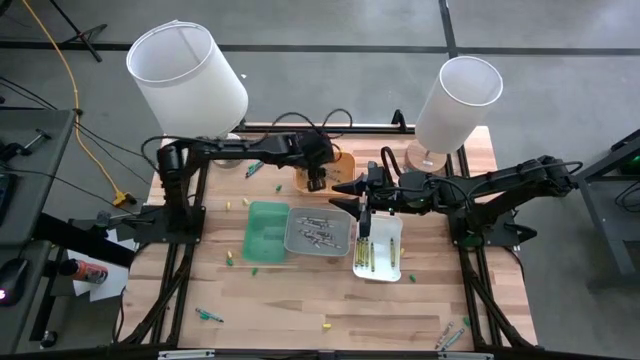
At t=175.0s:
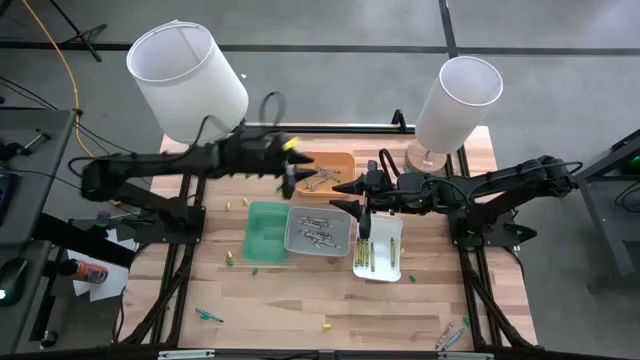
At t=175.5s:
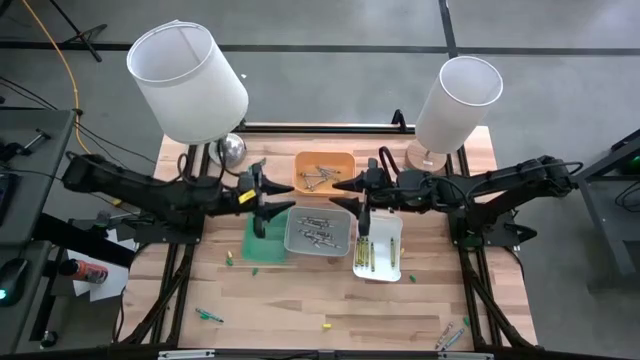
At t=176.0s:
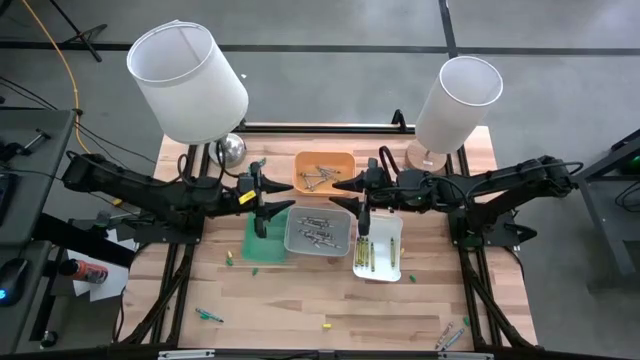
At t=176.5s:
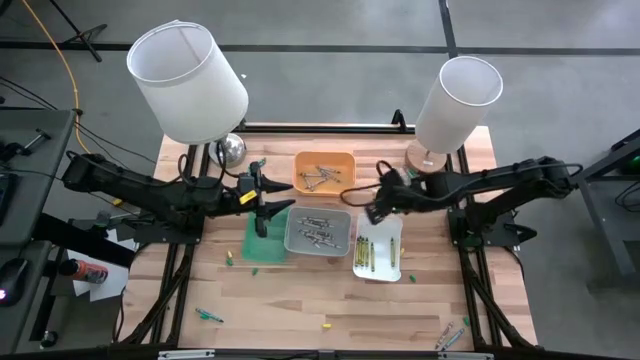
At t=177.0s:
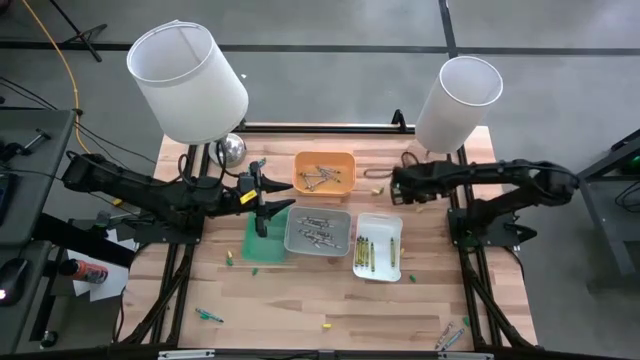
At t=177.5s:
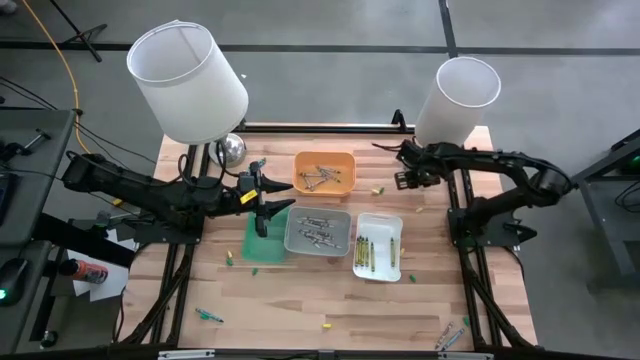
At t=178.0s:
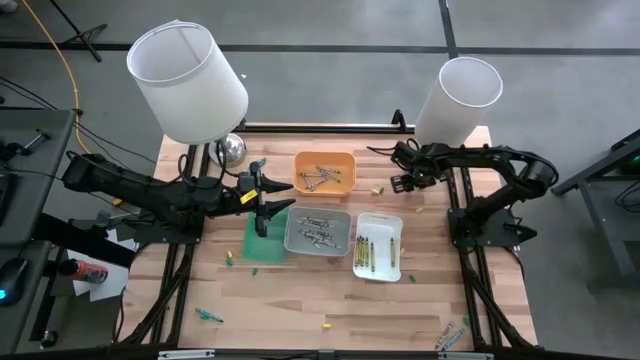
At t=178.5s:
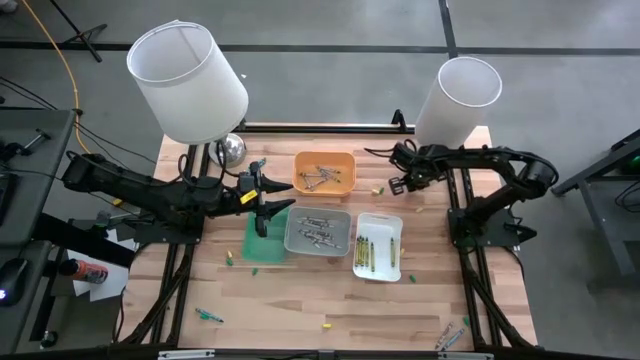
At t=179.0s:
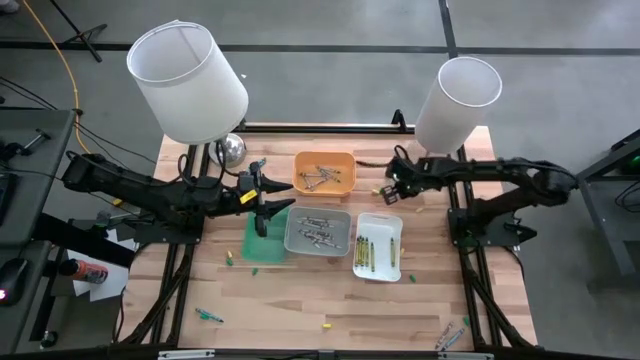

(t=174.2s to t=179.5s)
Task: Sort crayons
Put the blue crayon into the light blue bin

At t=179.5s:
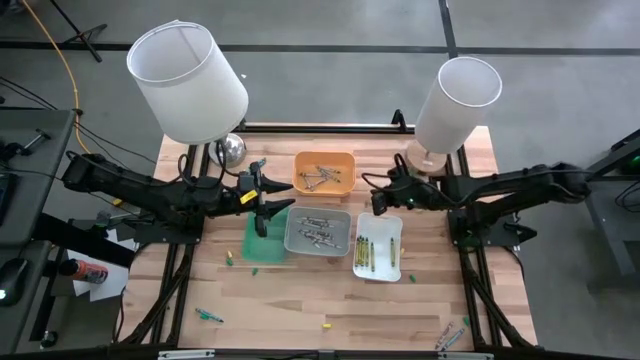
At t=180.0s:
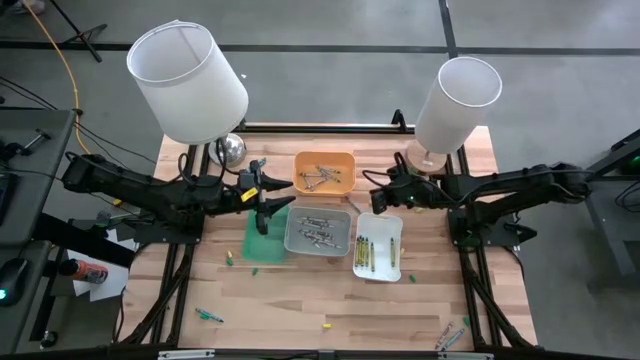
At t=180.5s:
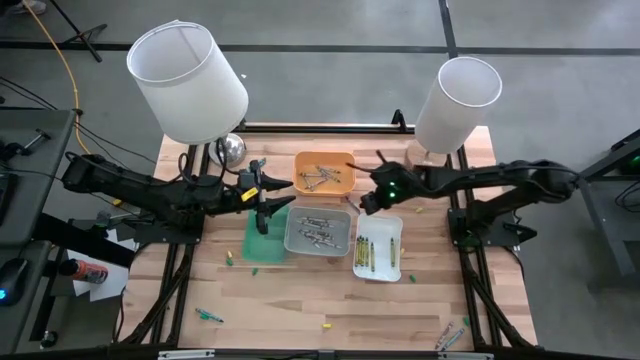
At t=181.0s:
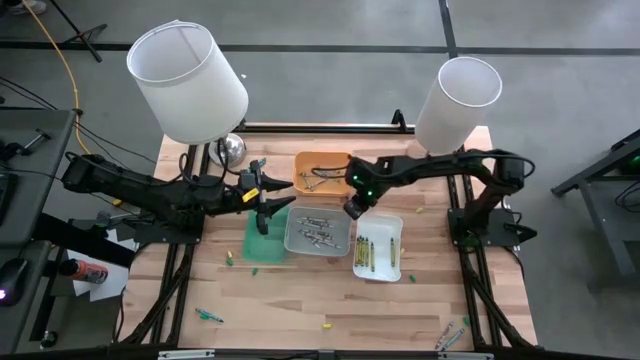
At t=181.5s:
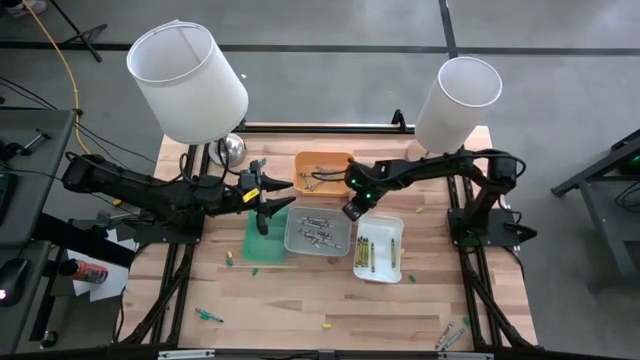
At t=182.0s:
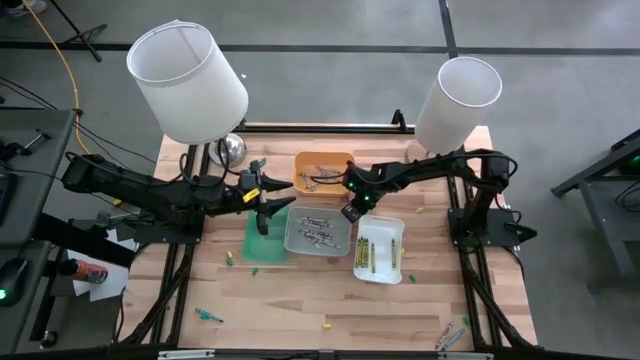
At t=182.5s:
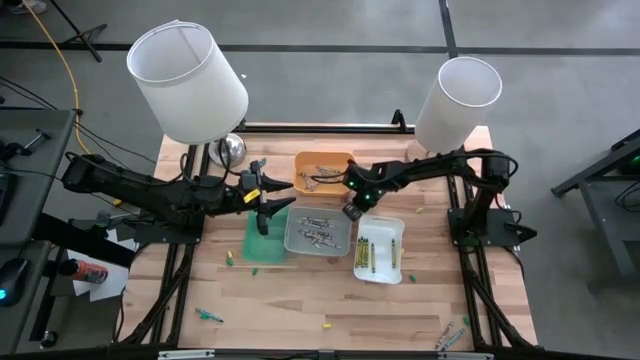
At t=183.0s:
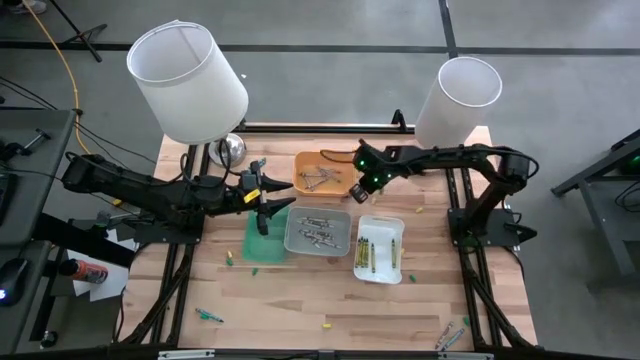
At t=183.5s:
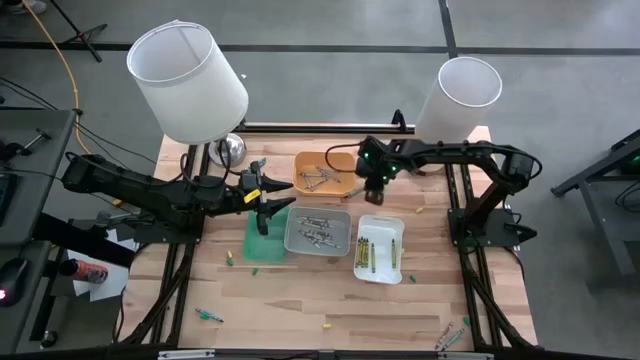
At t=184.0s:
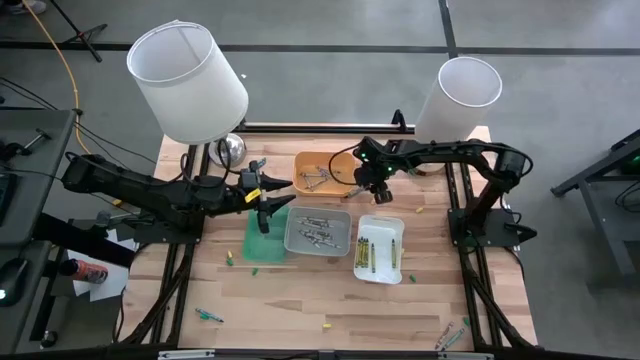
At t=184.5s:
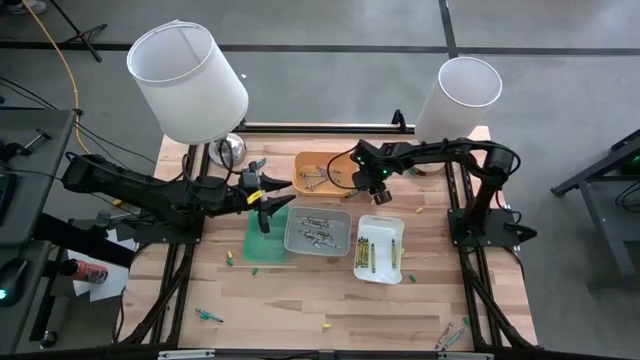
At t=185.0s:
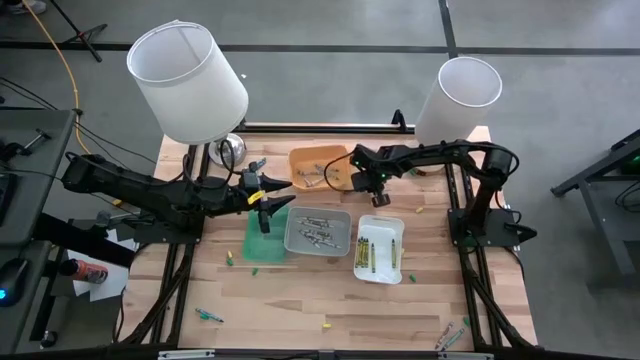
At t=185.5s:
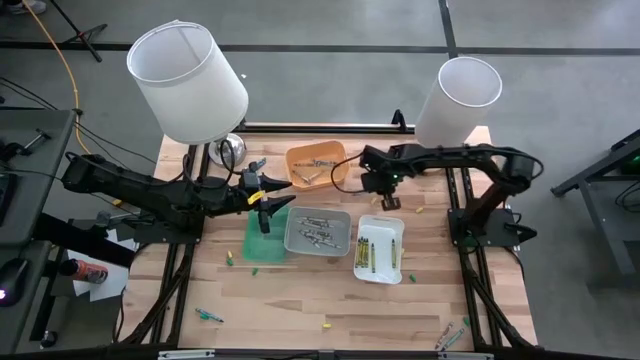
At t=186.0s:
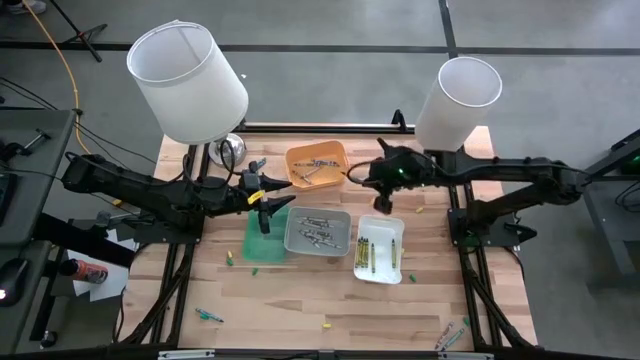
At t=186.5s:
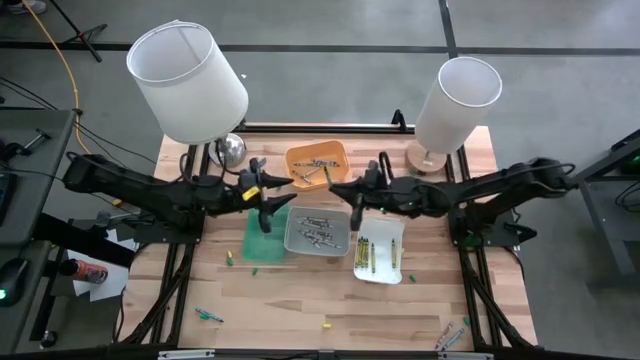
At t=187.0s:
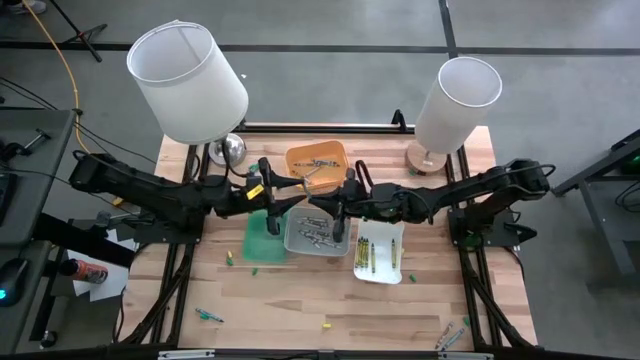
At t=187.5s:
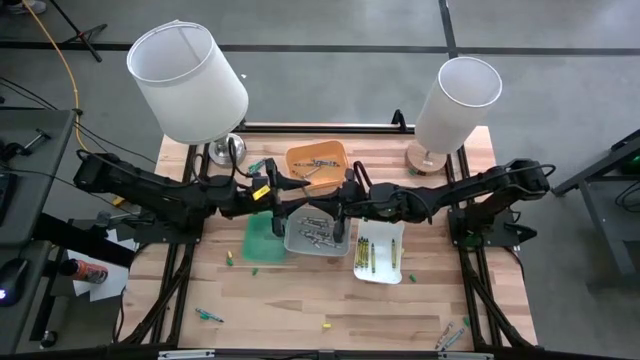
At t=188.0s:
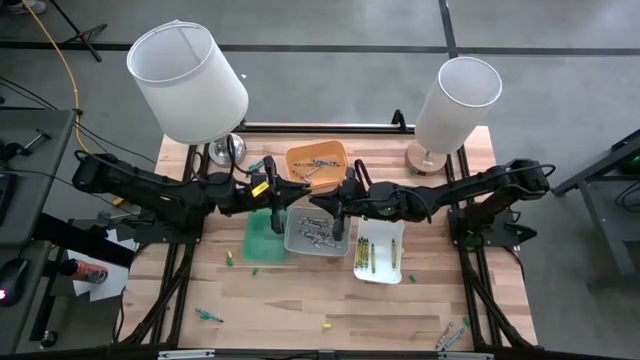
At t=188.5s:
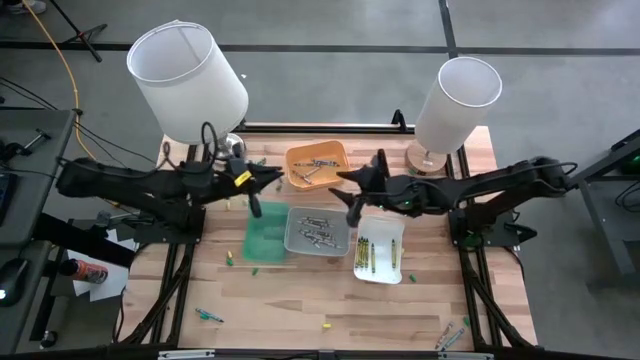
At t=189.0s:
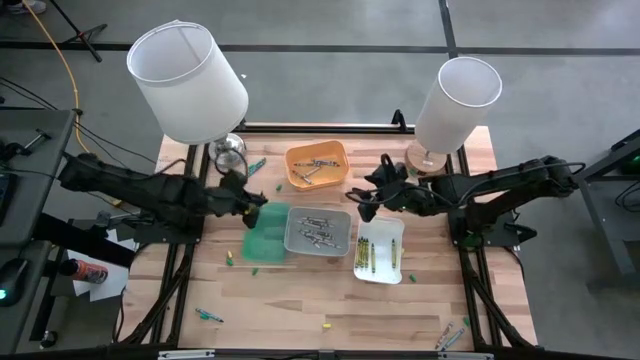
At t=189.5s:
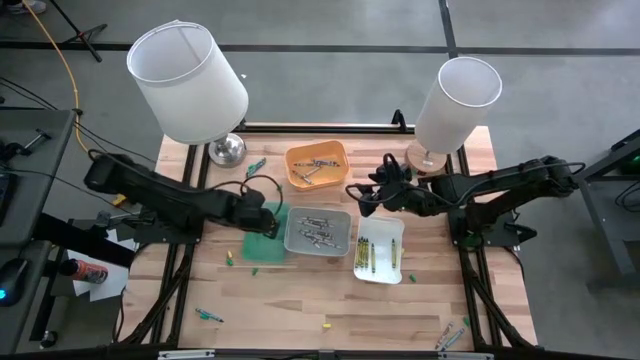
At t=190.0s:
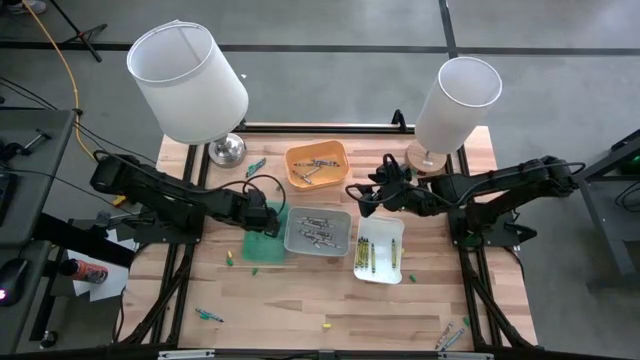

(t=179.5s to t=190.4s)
Put the blue crayon into the light blue bin

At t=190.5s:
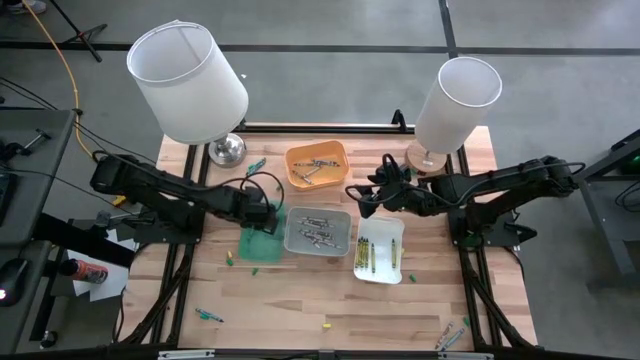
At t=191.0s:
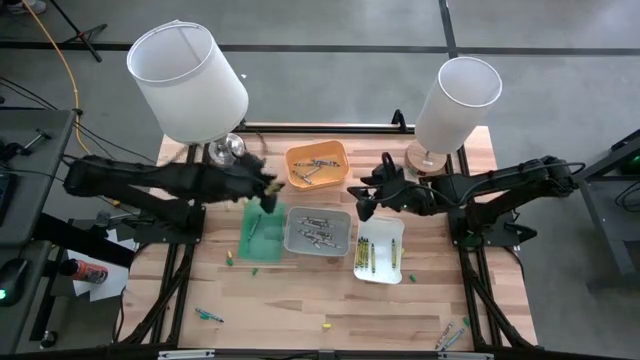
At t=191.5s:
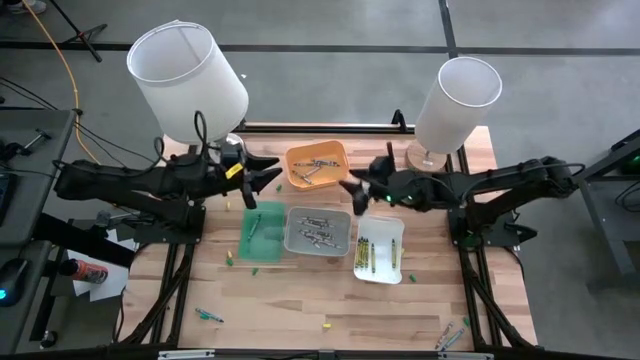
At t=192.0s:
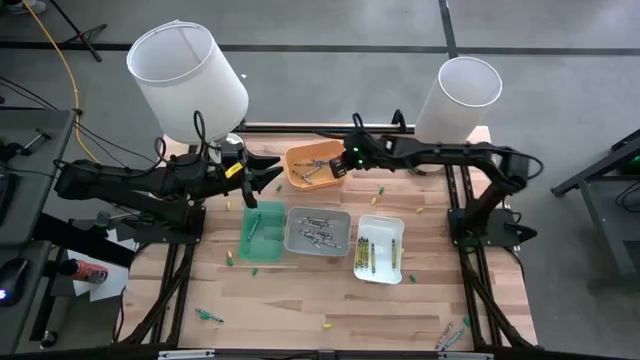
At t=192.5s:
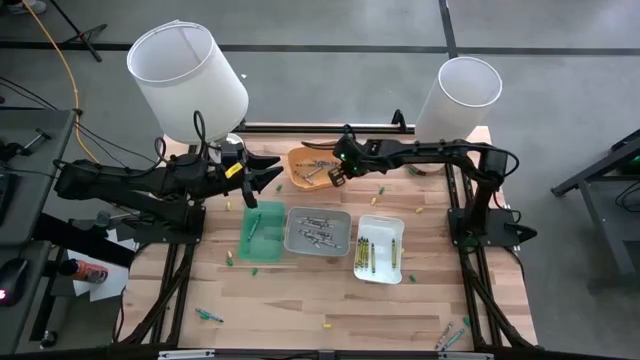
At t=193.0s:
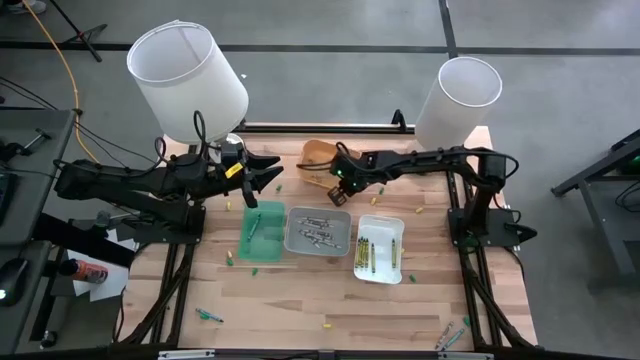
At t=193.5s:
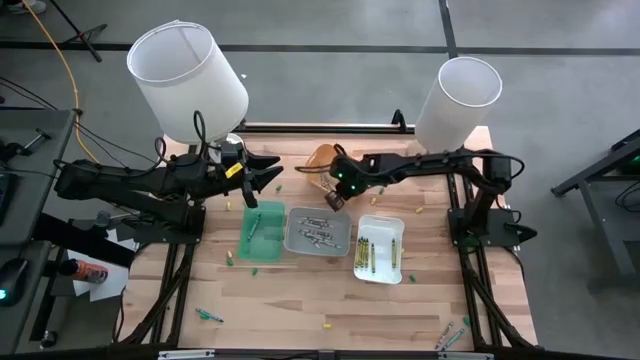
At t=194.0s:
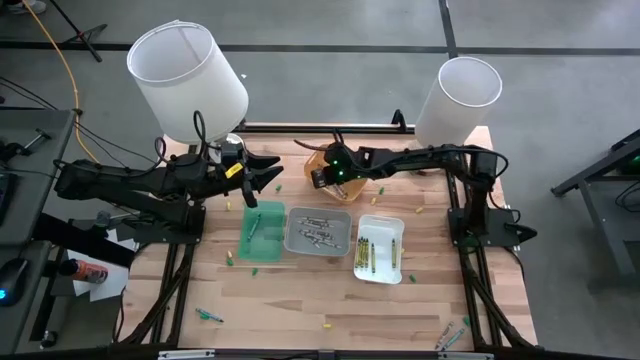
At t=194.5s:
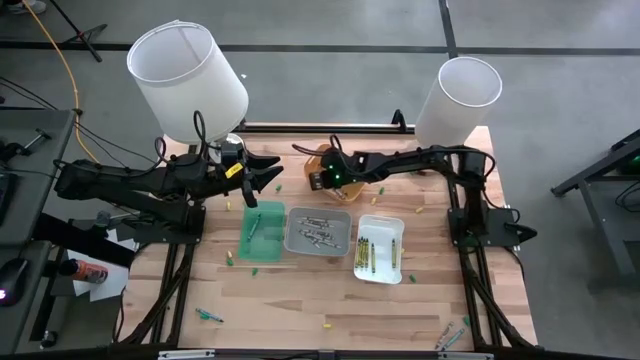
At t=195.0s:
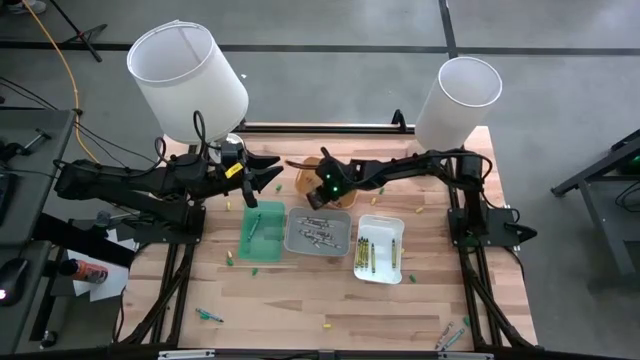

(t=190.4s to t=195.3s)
Adjust the yellow bin
